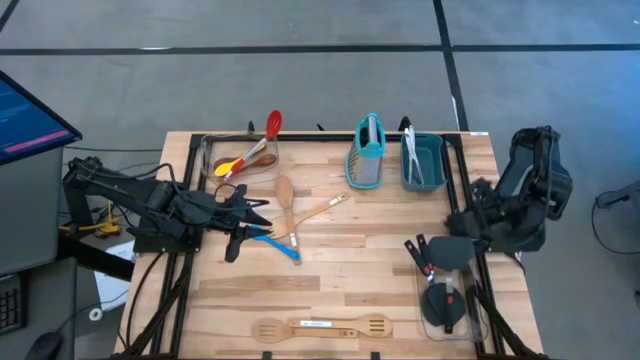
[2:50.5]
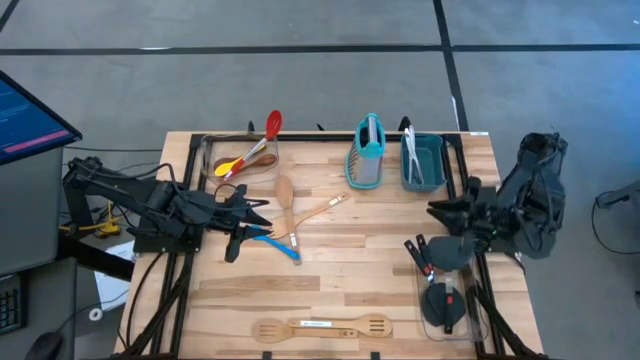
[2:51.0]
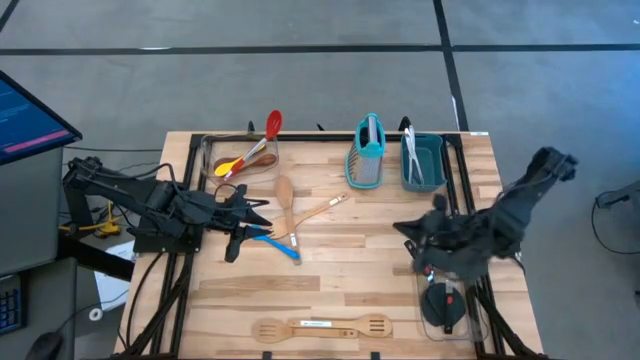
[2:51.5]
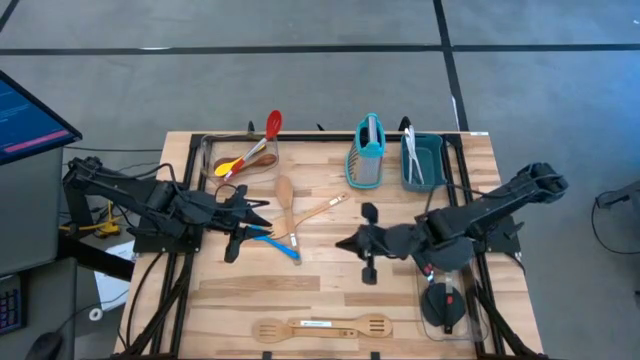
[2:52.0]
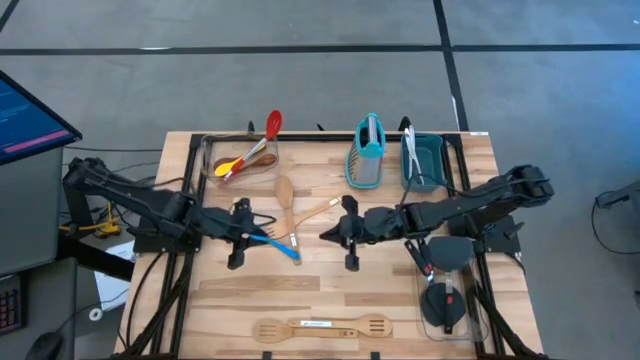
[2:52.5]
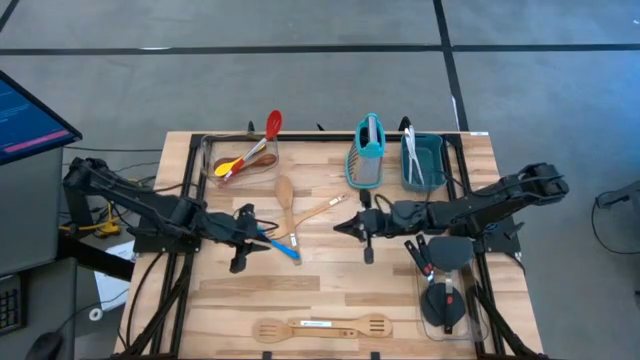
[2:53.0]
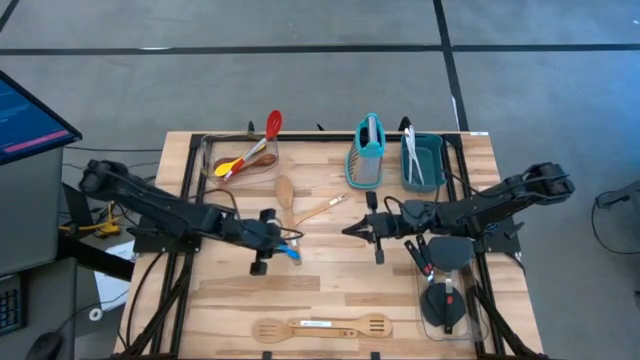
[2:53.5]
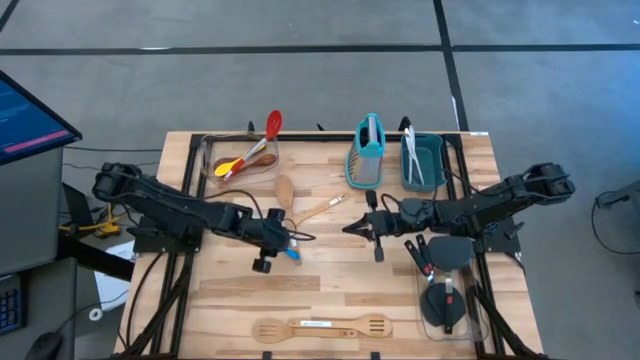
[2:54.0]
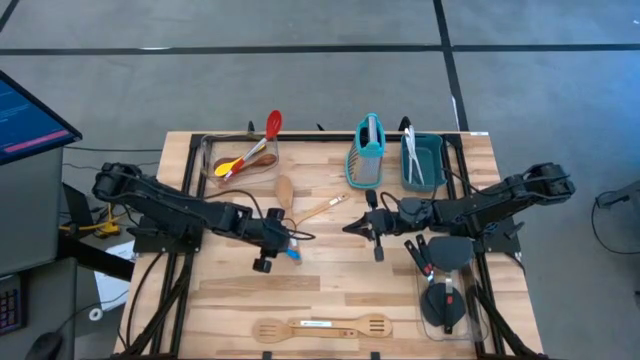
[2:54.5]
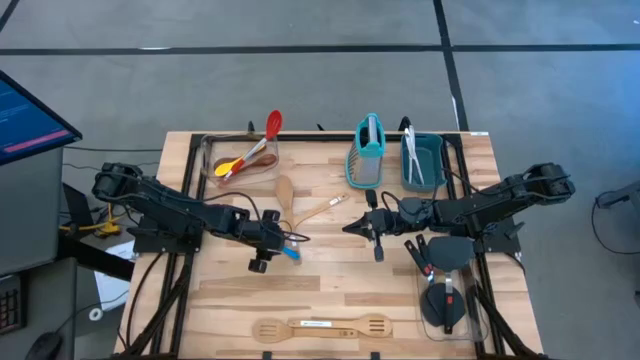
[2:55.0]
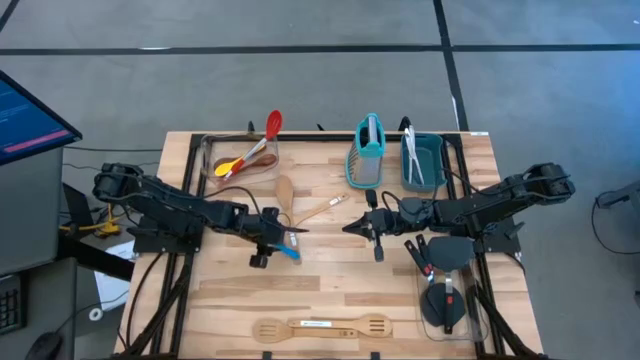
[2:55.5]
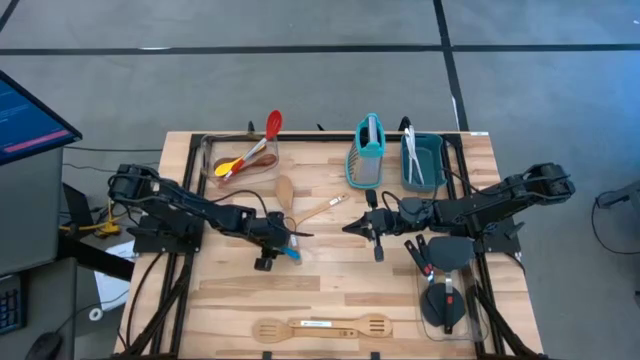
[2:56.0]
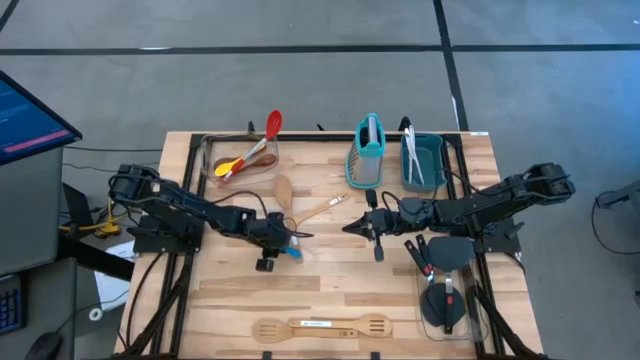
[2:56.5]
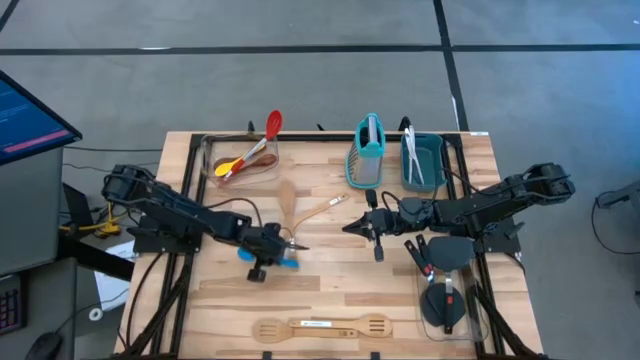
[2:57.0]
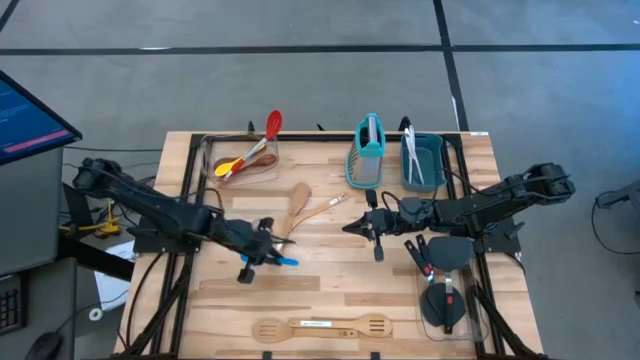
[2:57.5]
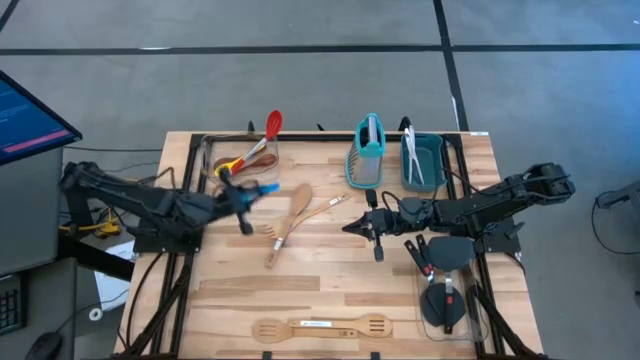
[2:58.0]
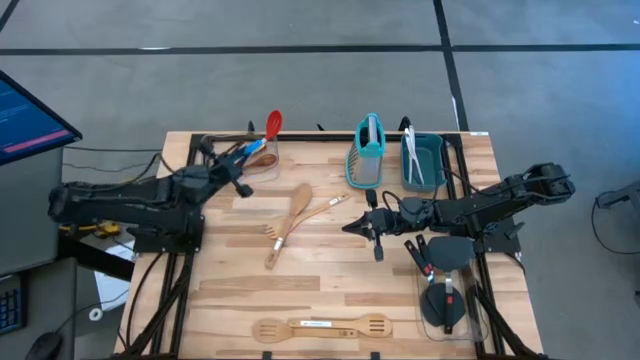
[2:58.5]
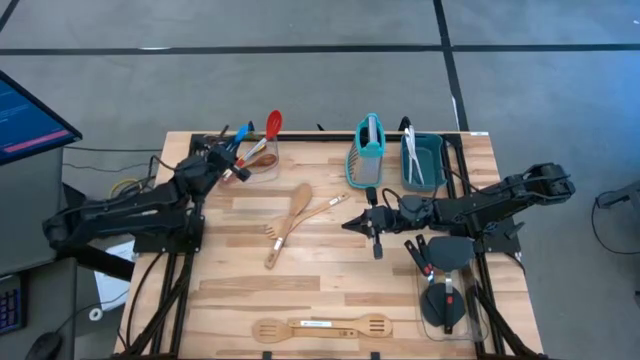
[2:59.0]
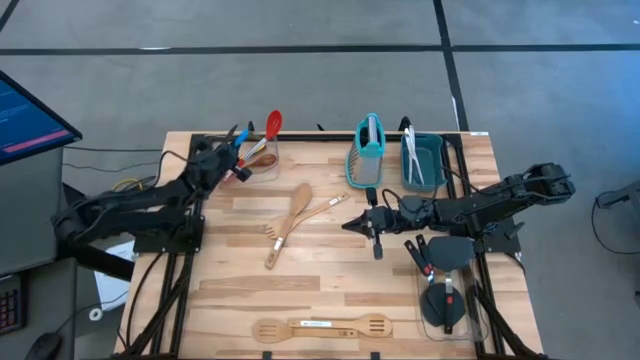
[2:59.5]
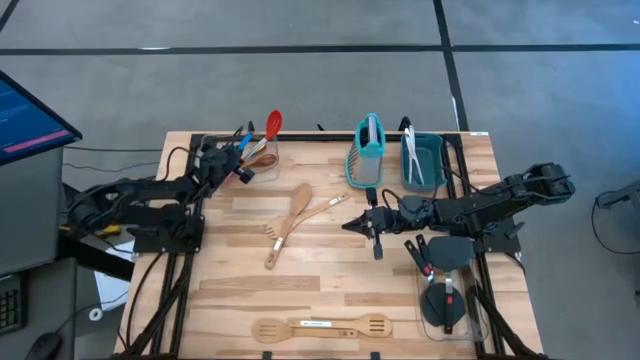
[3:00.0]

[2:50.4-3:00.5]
Task: Pick & Place Kitchen Items
Put the blue spoon into the left transparent bin

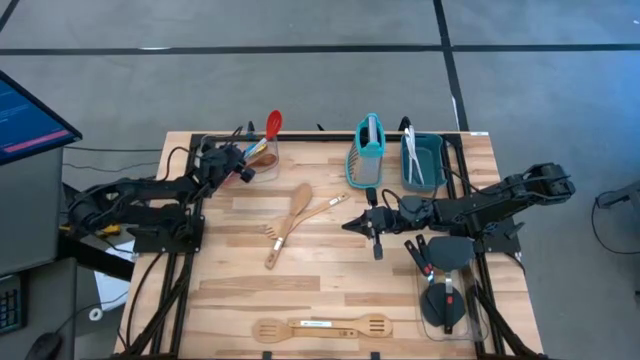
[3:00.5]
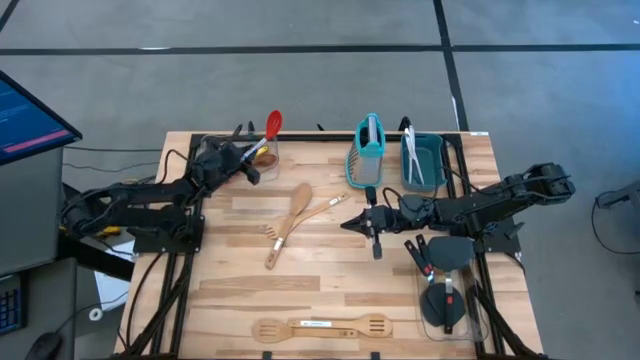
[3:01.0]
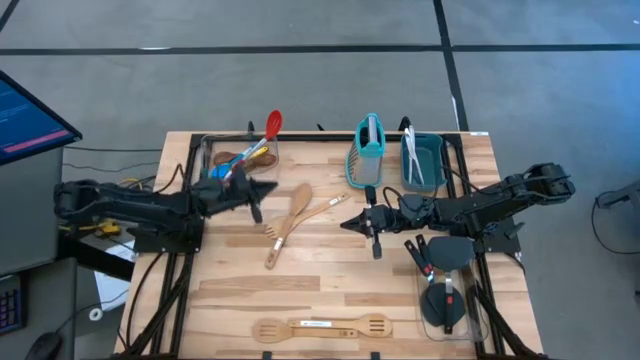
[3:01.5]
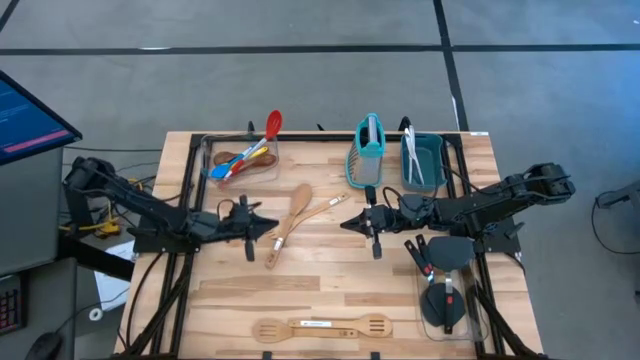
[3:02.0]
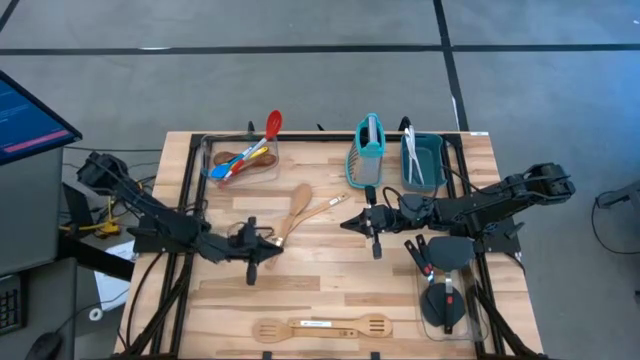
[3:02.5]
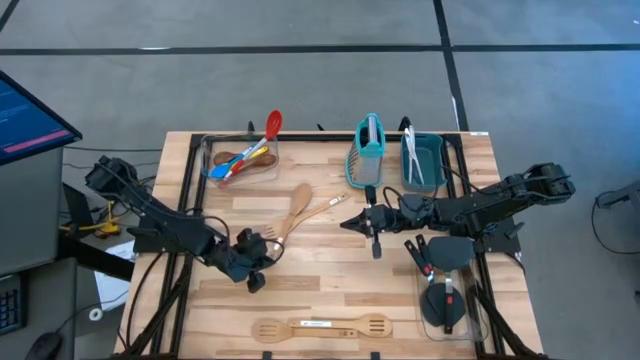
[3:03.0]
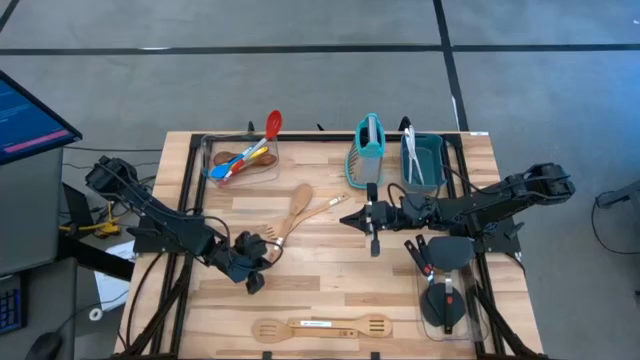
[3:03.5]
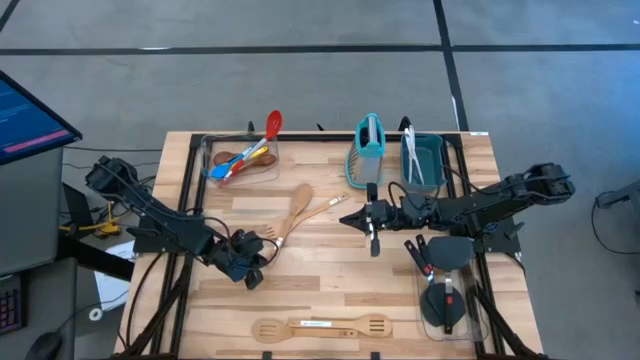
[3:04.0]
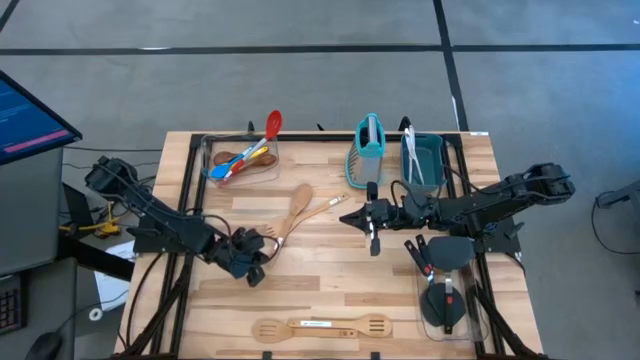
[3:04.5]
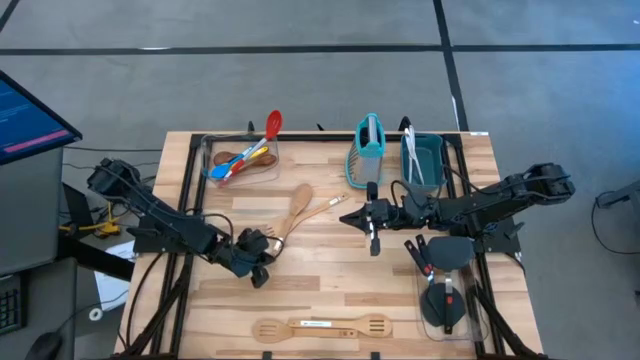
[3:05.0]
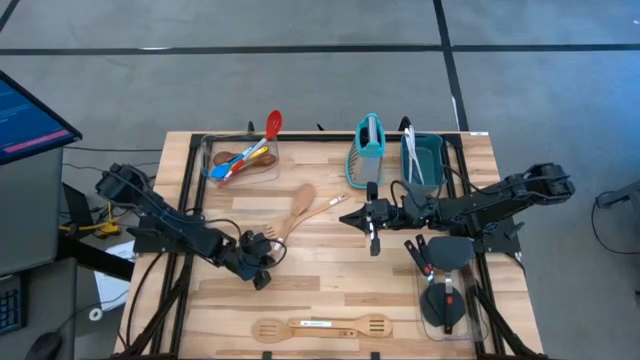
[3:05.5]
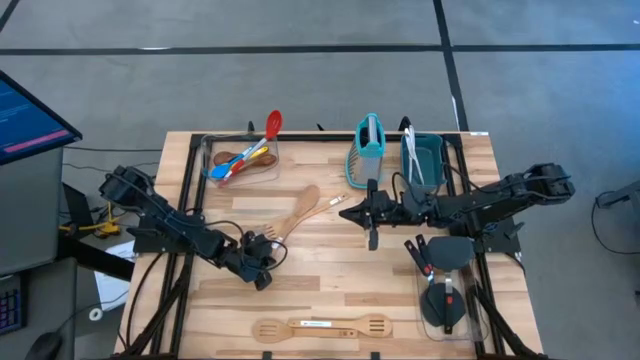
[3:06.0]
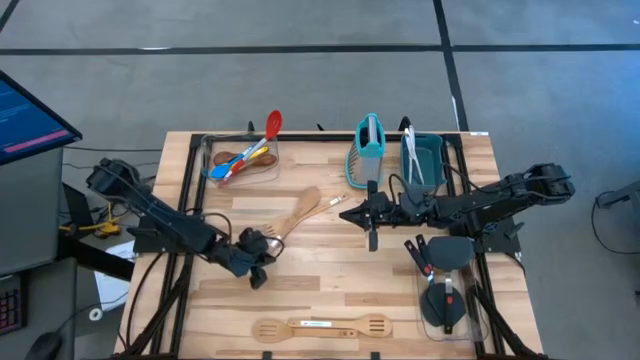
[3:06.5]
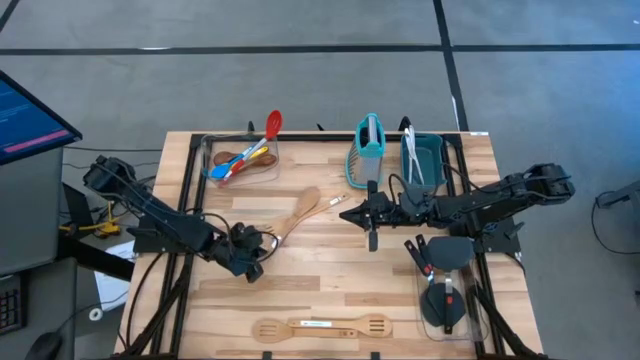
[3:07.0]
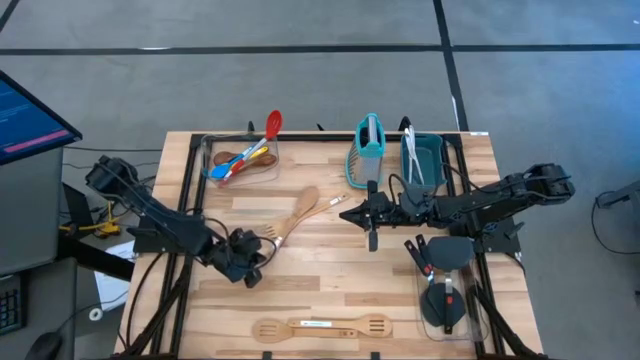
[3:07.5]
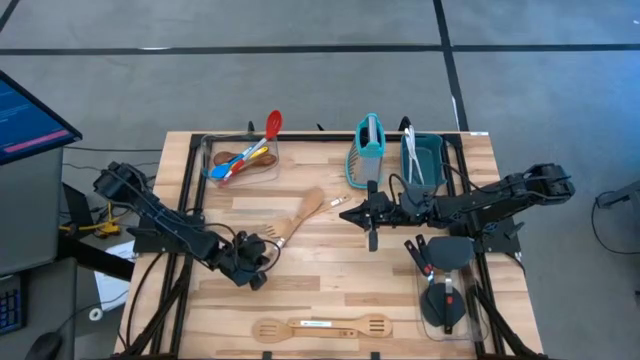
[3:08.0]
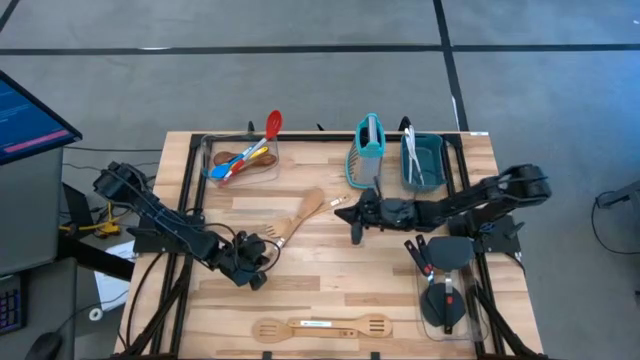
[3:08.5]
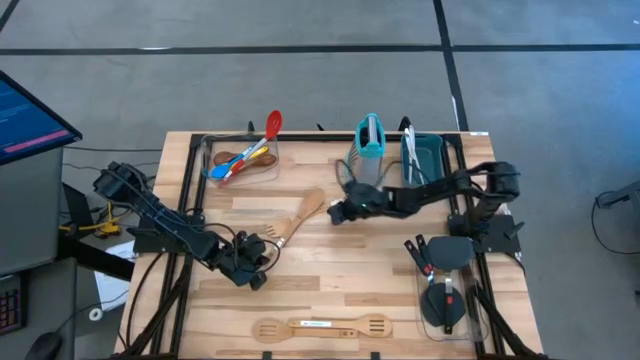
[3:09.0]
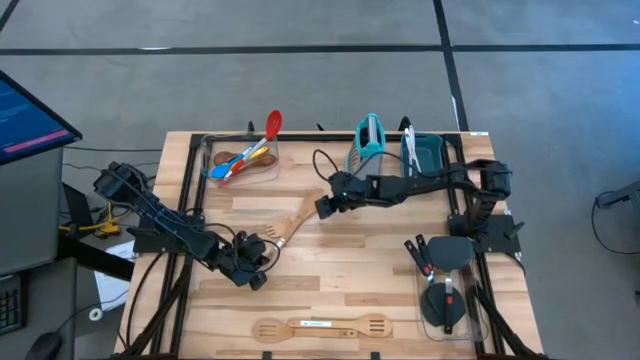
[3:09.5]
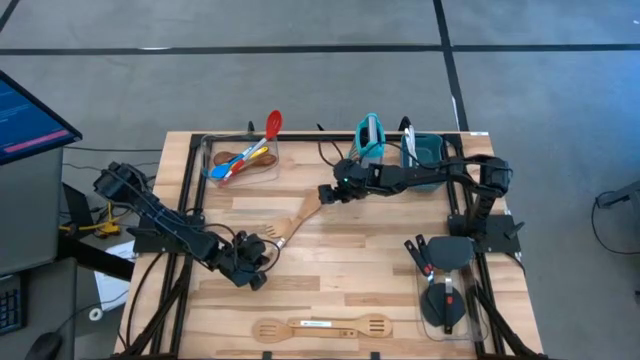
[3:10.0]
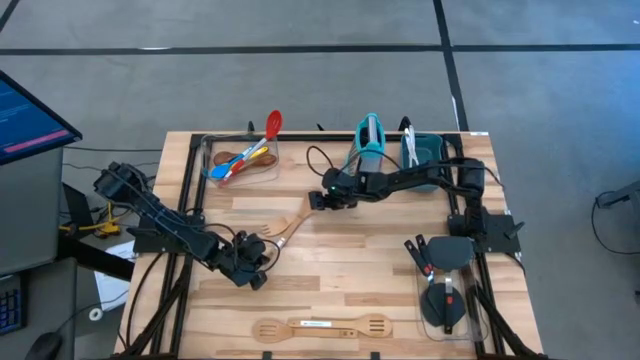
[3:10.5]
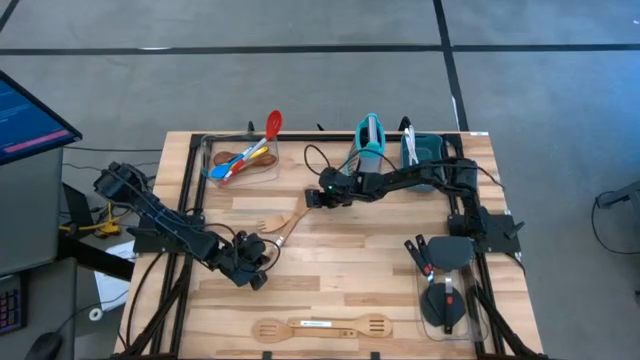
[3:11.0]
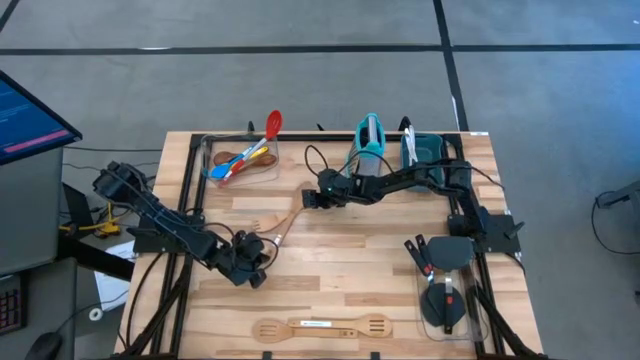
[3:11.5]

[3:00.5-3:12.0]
Put the wooden spoon into the left transparent bin
